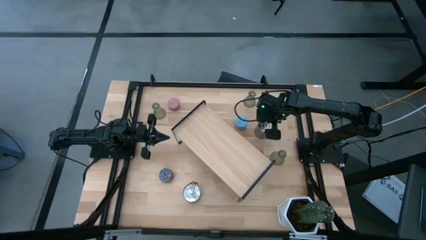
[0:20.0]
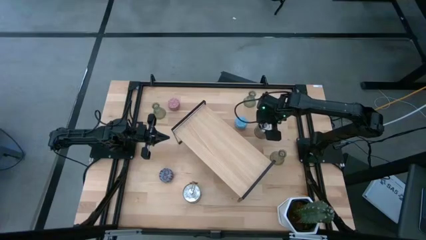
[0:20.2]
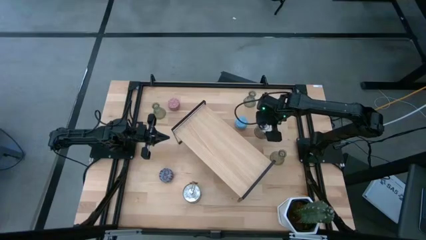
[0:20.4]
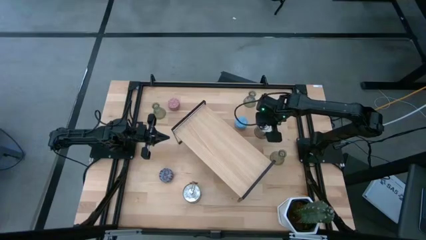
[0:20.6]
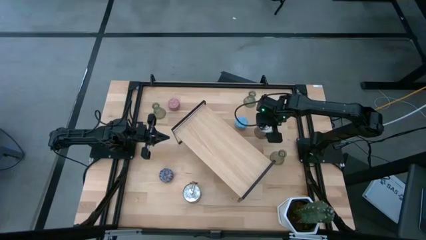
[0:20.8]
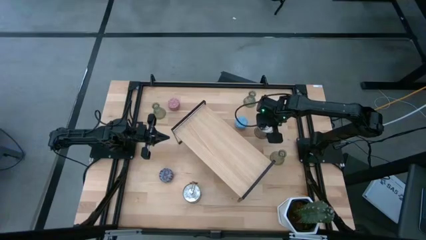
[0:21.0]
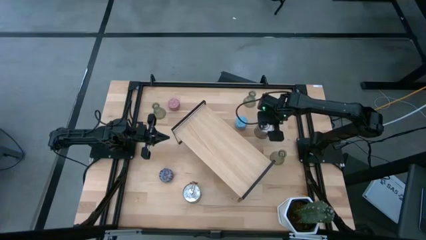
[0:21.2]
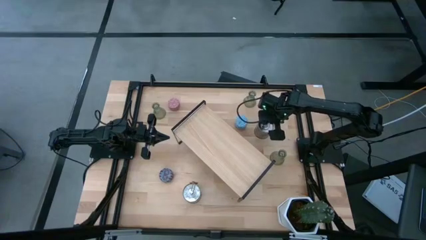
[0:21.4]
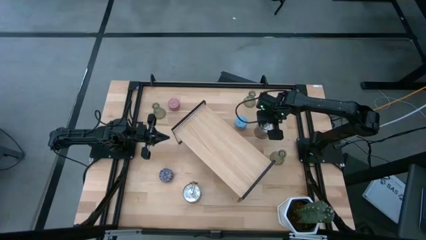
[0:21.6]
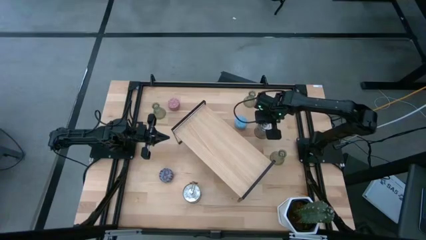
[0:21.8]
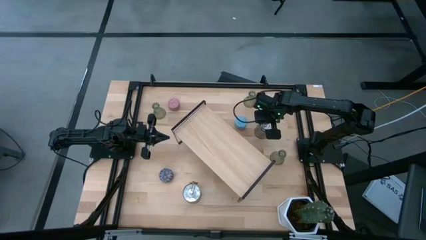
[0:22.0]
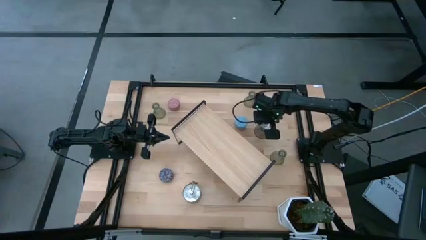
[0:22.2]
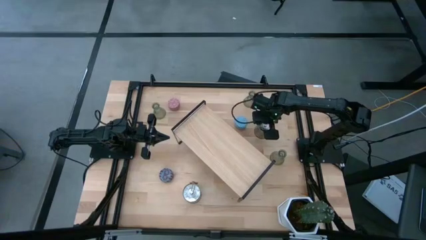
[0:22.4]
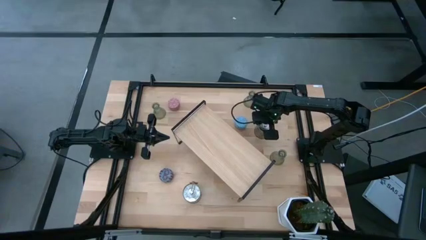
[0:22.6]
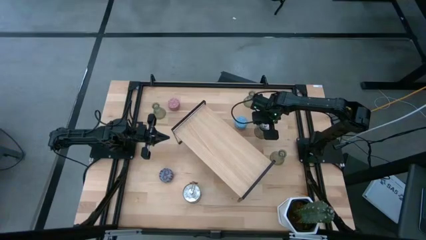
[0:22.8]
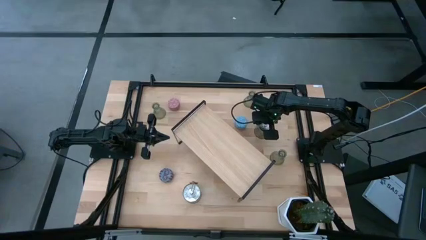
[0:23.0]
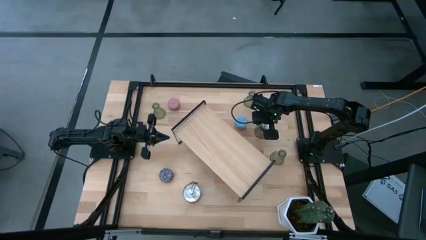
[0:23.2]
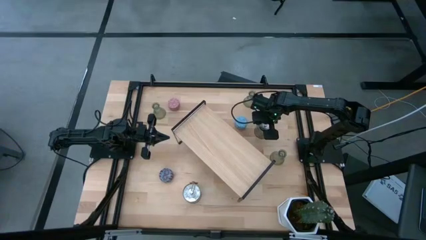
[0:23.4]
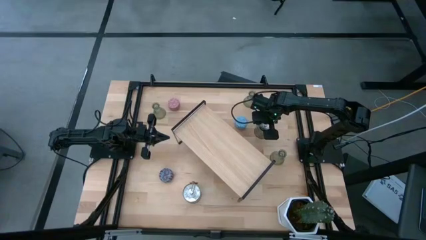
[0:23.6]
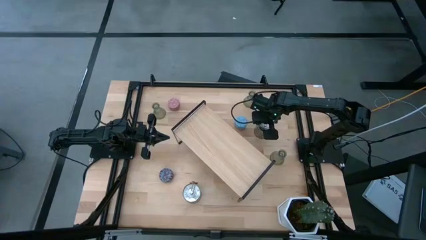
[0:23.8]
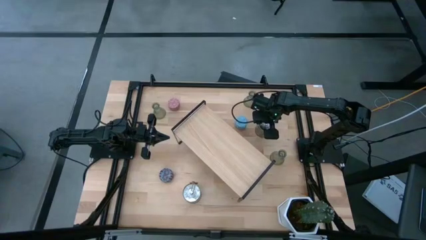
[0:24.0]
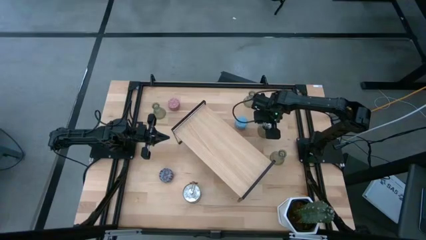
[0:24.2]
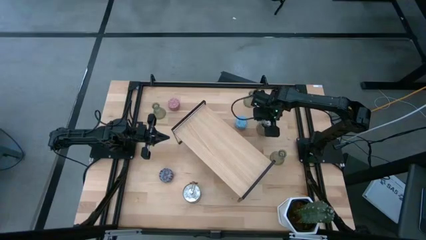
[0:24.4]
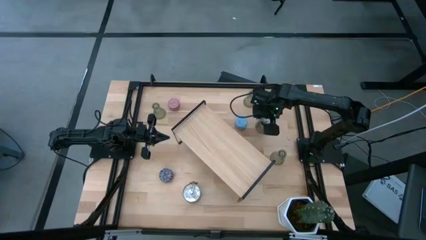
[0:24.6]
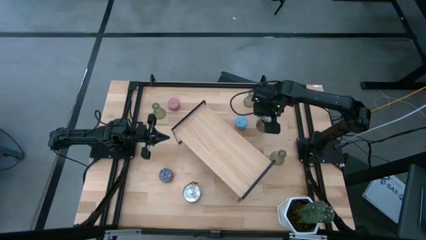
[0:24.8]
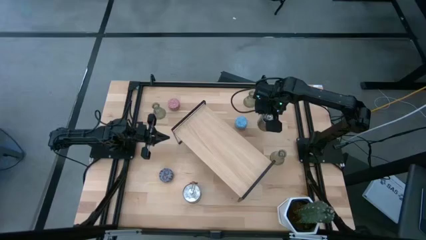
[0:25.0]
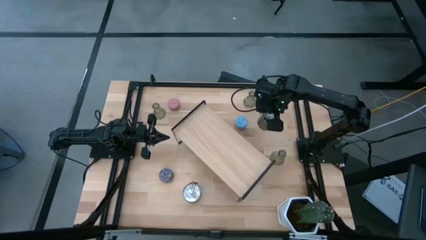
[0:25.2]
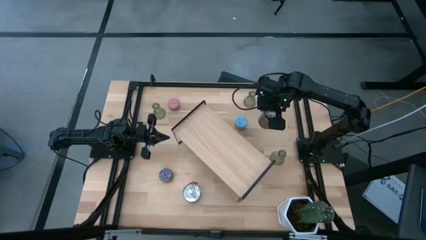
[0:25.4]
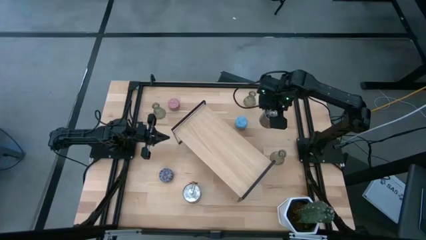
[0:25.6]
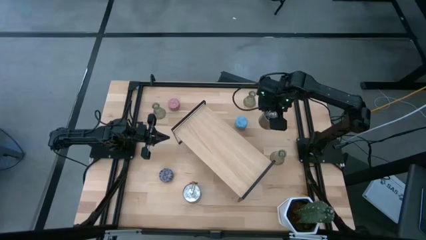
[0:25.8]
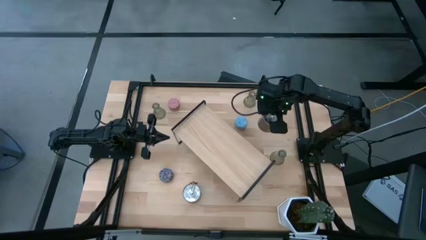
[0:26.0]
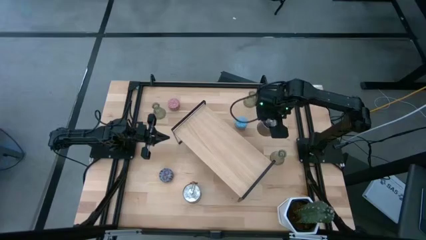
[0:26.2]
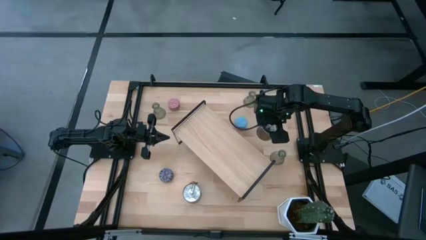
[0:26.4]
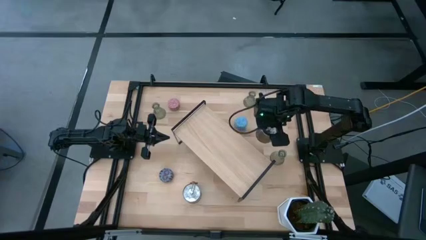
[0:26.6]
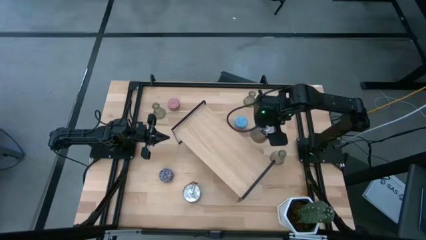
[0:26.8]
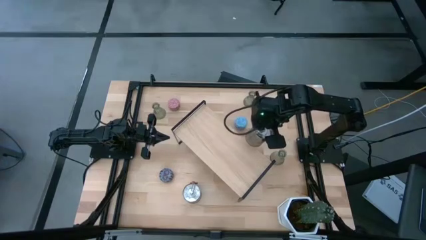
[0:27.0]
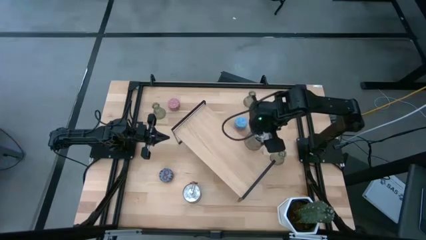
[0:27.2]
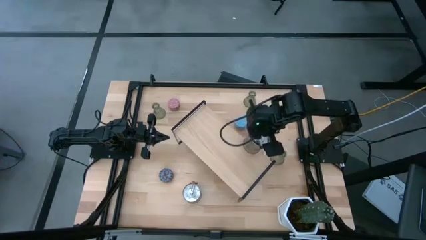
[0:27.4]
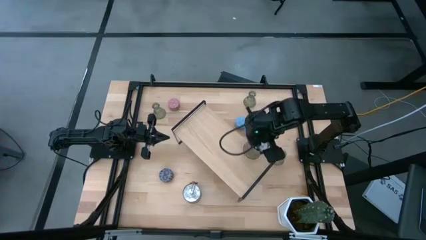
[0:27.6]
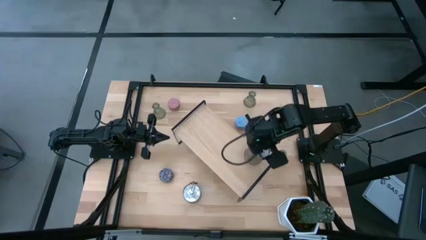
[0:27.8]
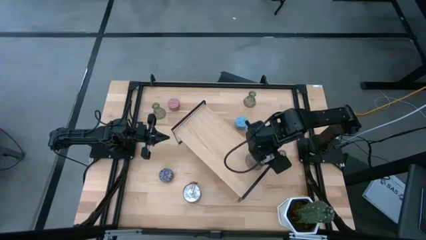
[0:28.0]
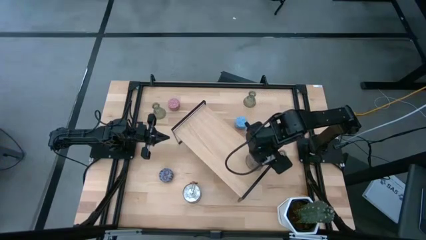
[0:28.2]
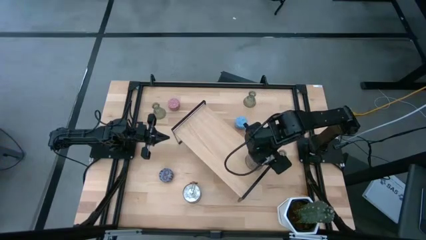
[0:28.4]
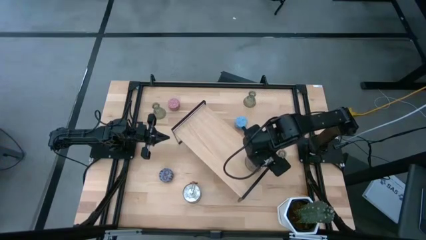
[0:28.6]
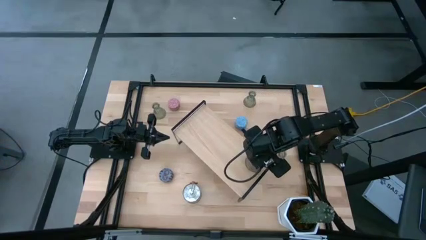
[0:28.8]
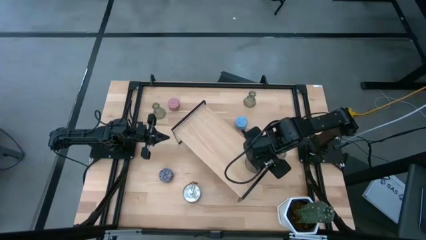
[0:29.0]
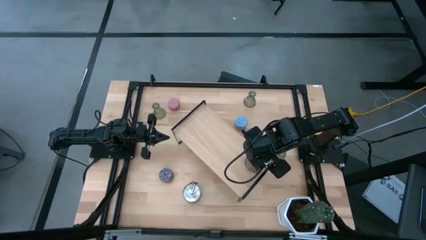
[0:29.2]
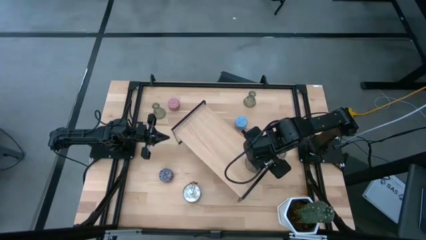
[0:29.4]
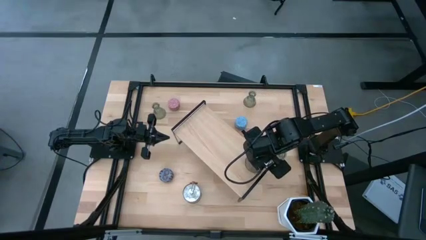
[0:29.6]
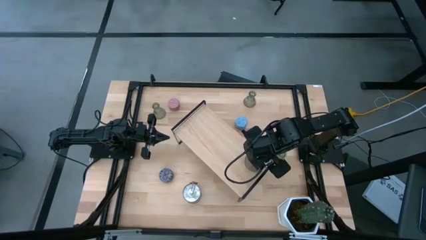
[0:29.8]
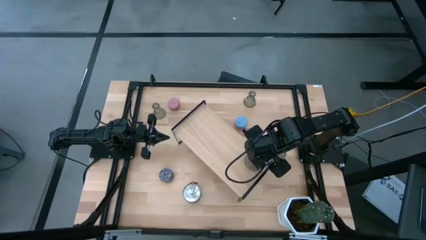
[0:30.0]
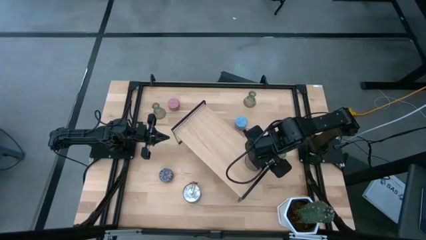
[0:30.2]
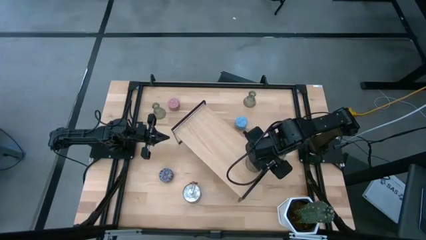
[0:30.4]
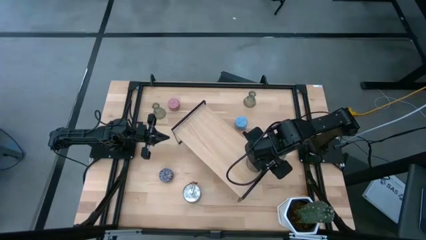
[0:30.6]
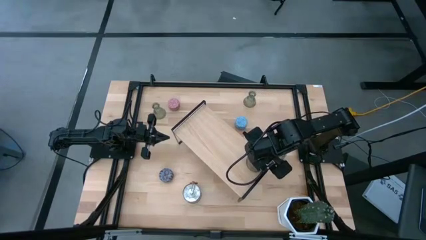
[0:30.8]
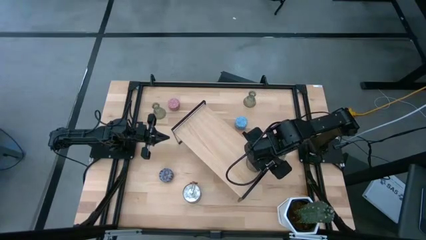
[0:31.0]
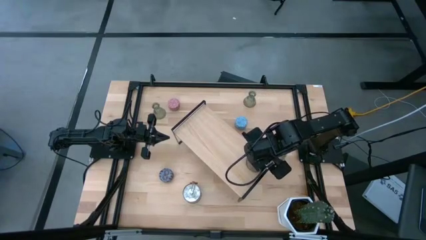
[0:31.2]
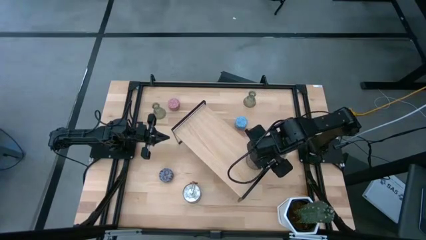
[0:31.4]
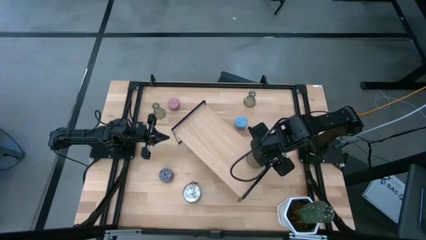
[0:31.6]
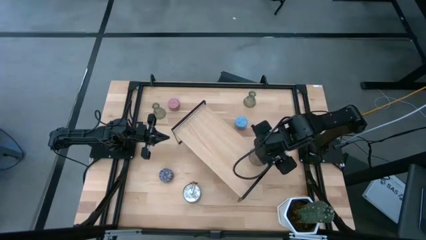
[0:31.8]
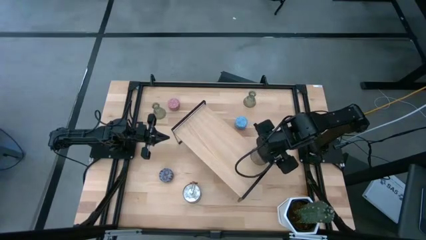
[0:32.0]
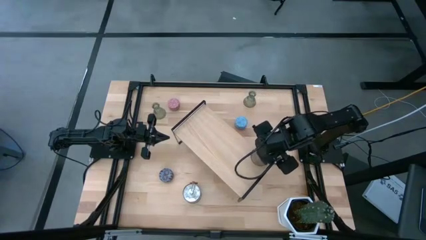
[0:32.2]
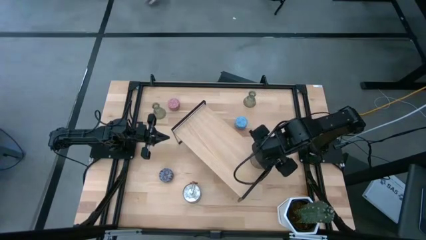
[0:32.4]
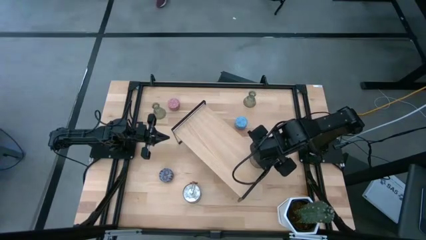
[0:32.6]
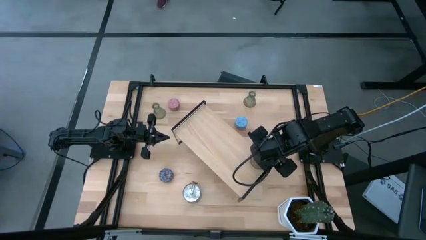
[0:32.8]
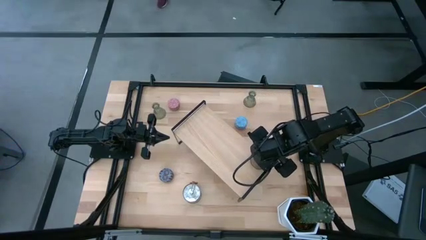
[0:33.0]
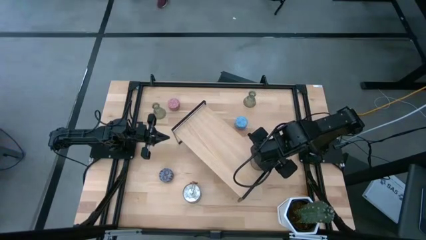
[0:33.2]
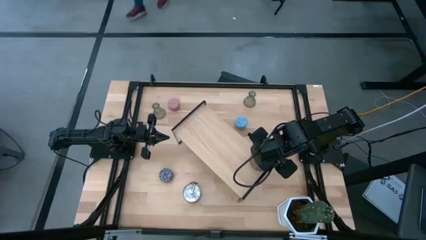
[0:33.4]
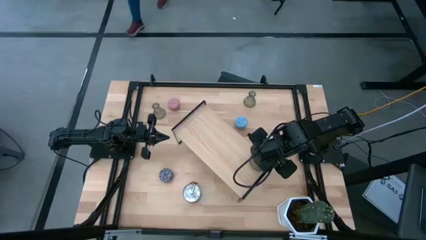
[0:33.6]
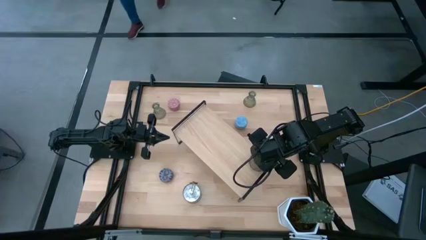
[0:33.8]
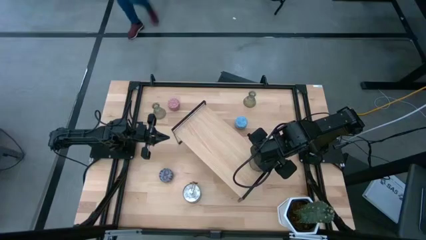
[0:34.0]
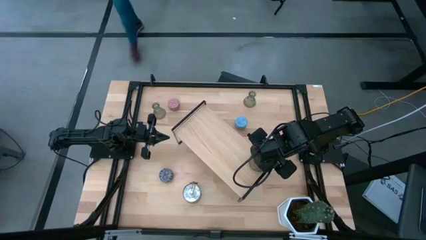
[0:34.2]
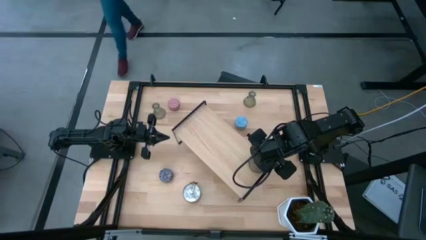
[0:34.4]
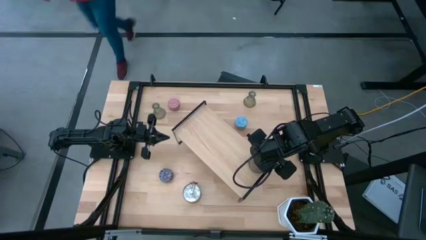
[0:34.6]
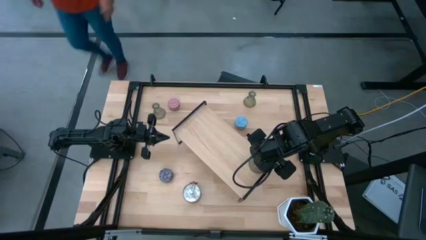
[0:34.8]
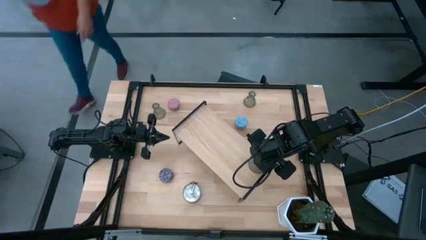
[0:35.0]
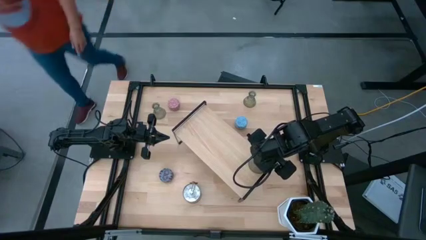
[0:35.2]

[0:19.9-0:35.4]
Task: Pick & Place candle stick holders
Put the top silver scented candle can on the shelf
